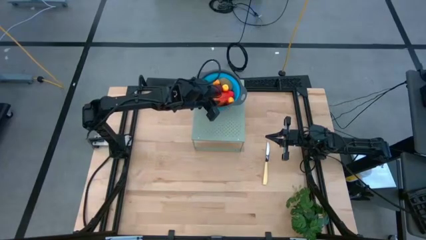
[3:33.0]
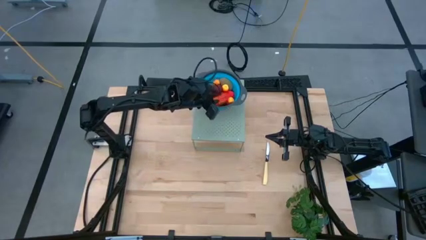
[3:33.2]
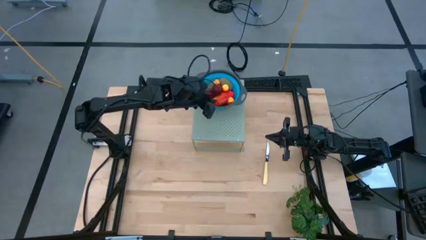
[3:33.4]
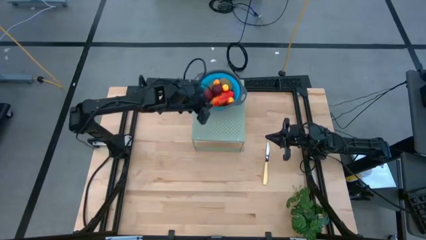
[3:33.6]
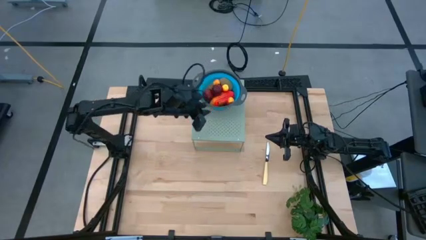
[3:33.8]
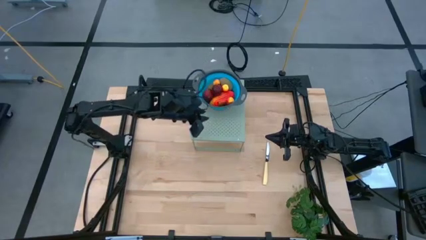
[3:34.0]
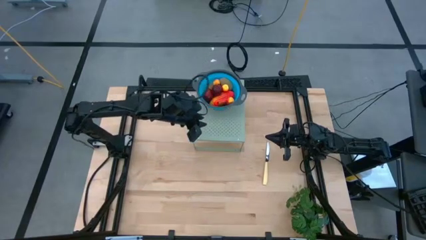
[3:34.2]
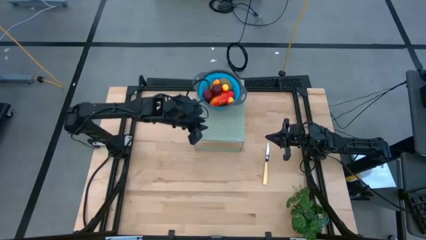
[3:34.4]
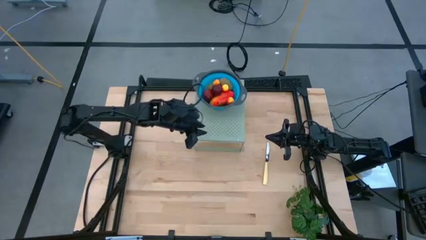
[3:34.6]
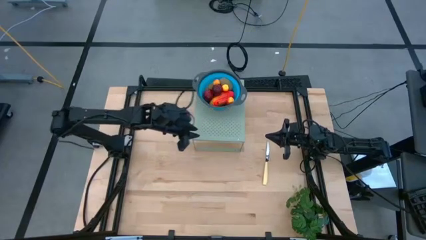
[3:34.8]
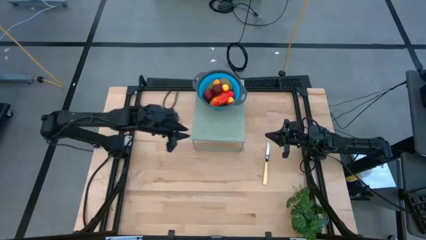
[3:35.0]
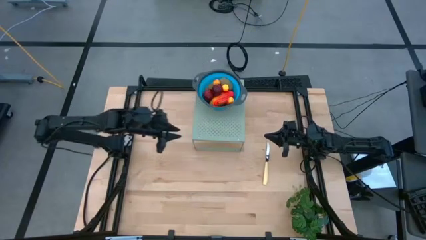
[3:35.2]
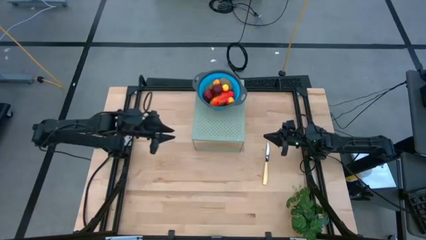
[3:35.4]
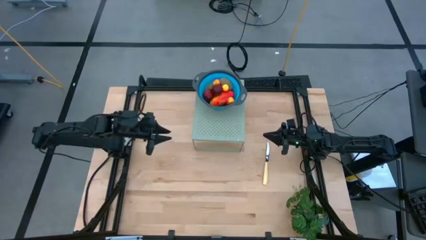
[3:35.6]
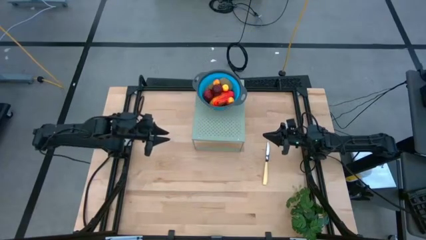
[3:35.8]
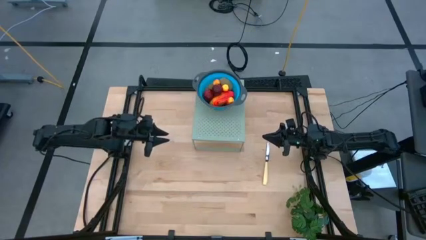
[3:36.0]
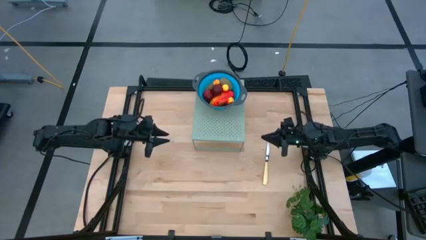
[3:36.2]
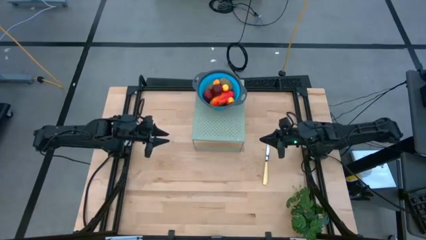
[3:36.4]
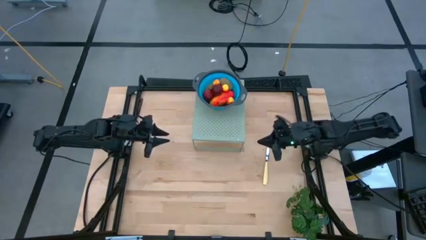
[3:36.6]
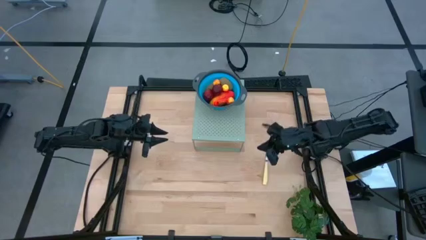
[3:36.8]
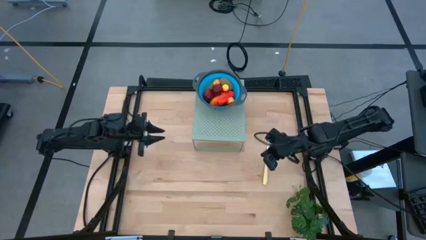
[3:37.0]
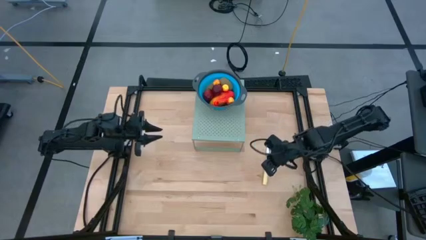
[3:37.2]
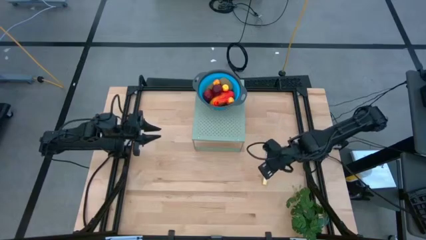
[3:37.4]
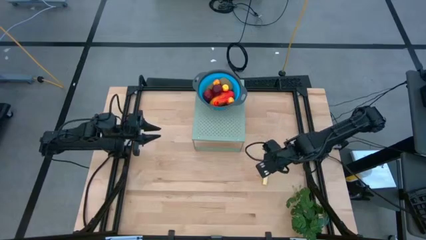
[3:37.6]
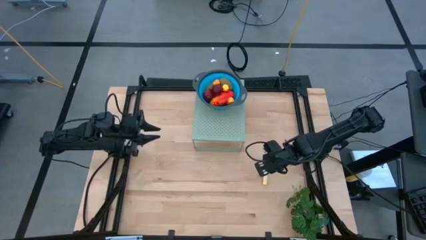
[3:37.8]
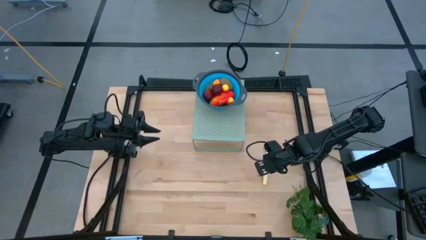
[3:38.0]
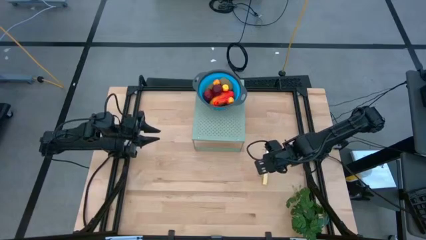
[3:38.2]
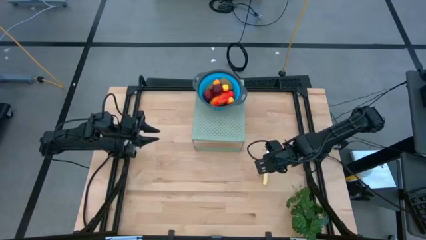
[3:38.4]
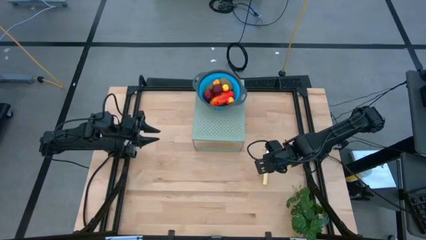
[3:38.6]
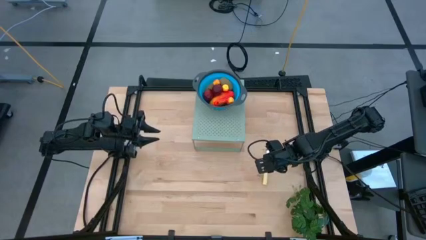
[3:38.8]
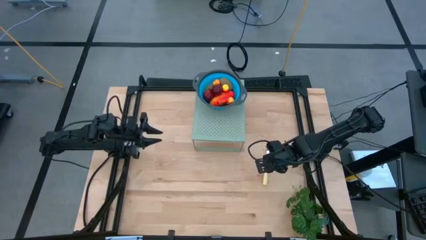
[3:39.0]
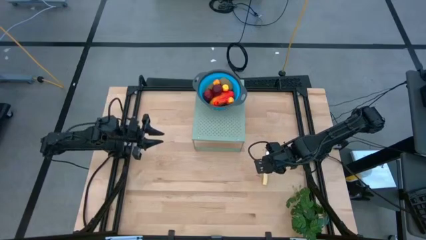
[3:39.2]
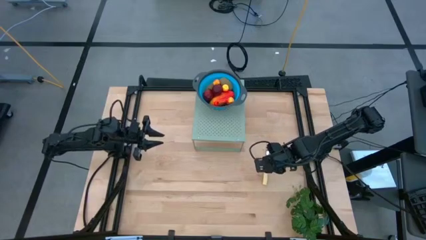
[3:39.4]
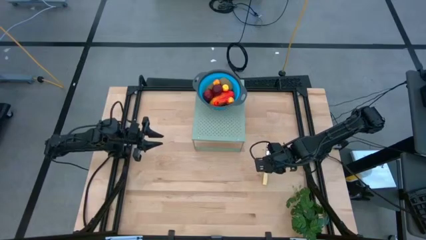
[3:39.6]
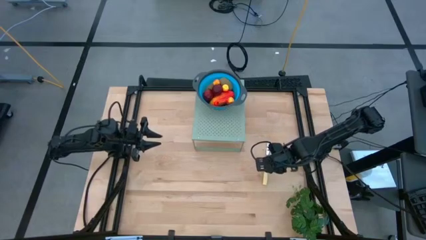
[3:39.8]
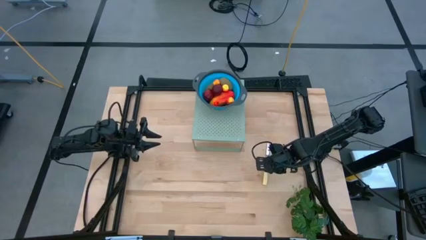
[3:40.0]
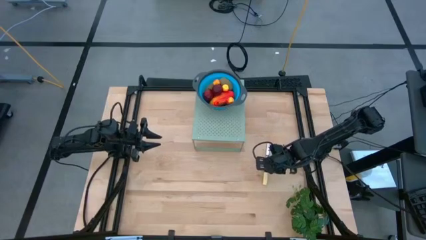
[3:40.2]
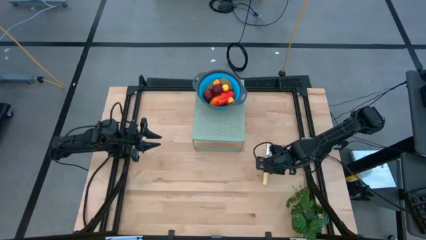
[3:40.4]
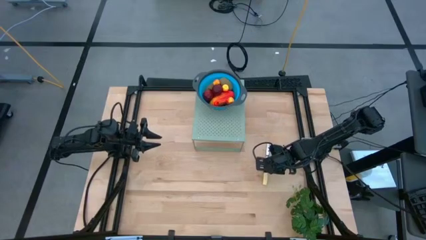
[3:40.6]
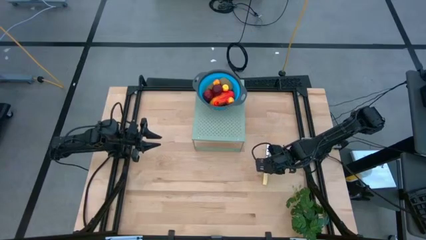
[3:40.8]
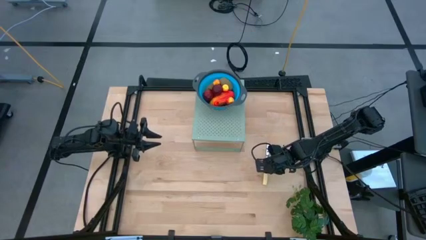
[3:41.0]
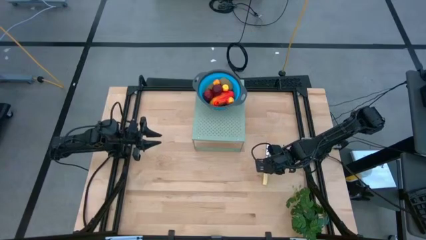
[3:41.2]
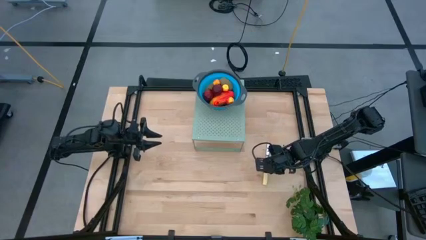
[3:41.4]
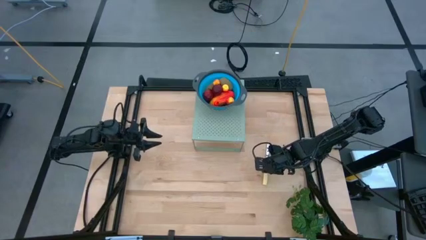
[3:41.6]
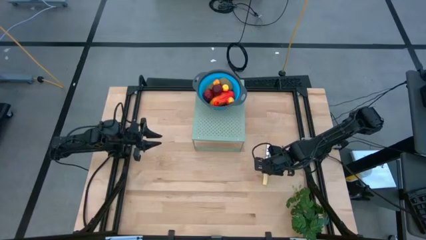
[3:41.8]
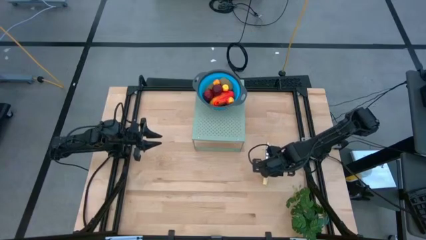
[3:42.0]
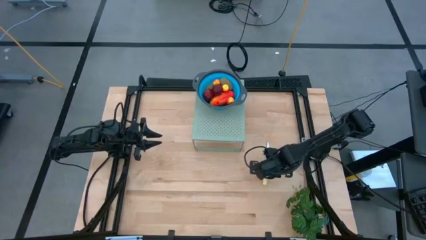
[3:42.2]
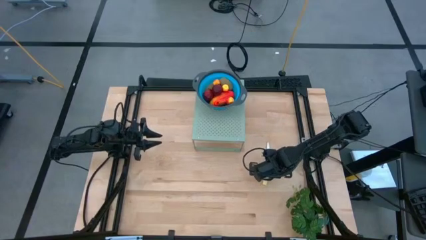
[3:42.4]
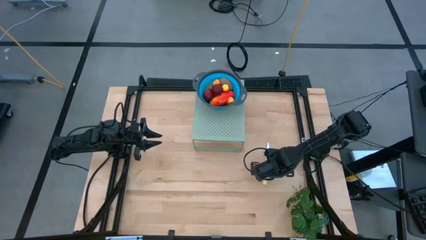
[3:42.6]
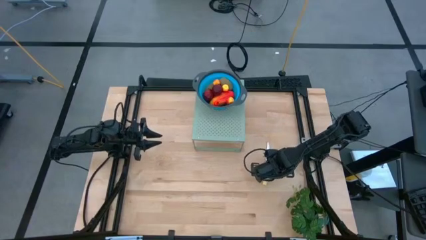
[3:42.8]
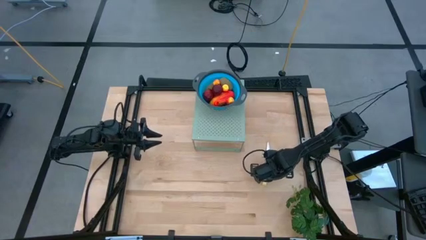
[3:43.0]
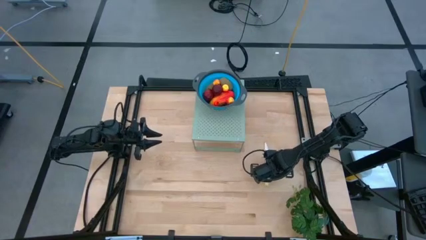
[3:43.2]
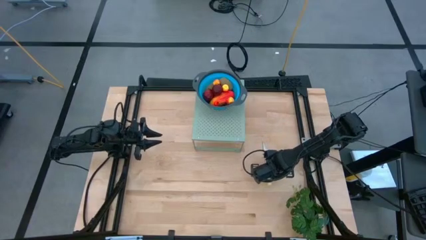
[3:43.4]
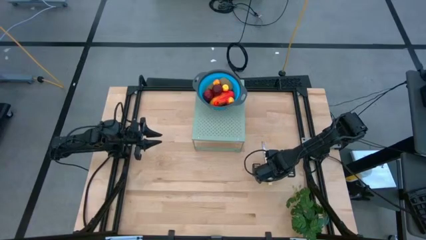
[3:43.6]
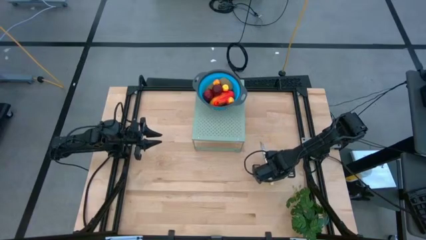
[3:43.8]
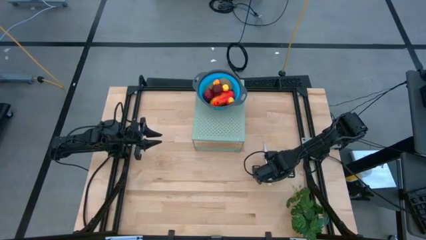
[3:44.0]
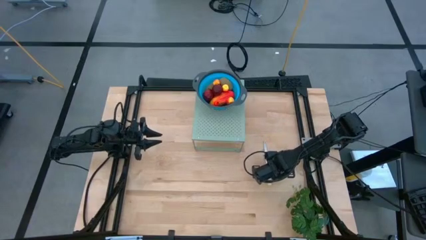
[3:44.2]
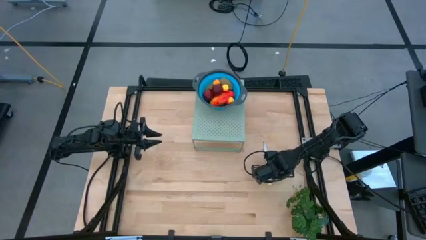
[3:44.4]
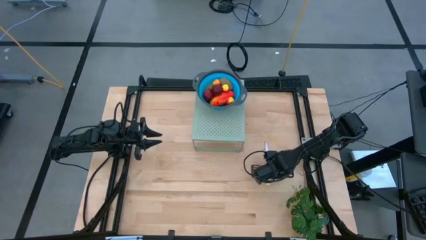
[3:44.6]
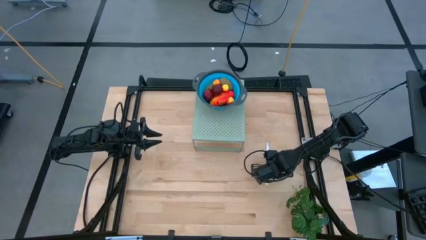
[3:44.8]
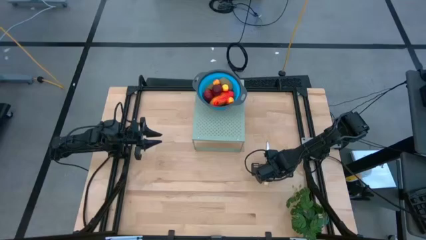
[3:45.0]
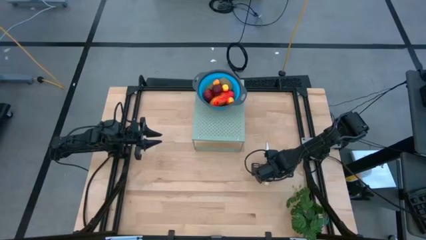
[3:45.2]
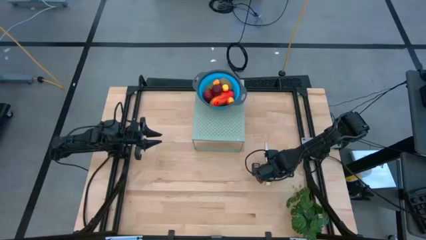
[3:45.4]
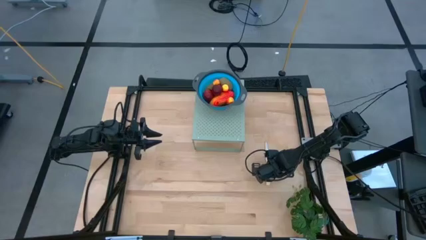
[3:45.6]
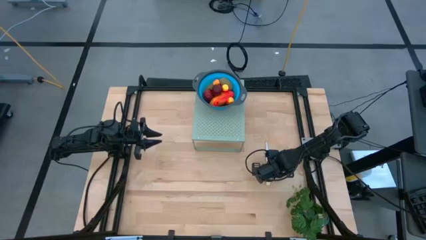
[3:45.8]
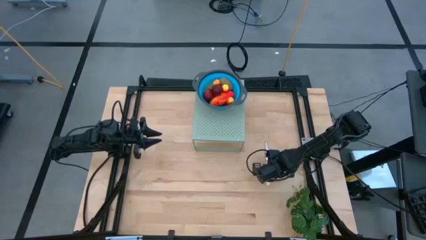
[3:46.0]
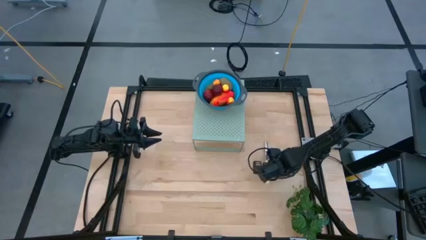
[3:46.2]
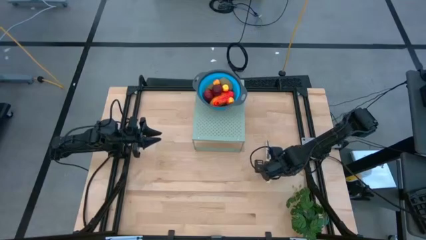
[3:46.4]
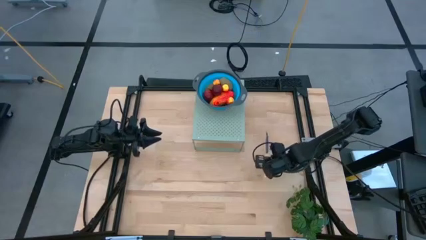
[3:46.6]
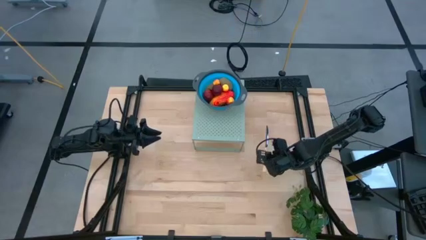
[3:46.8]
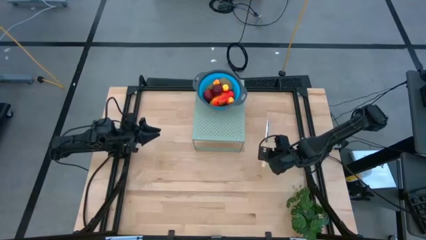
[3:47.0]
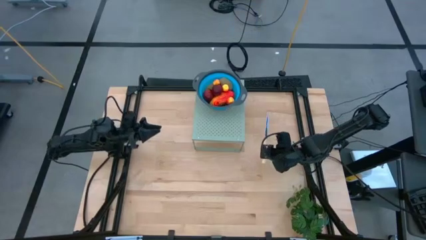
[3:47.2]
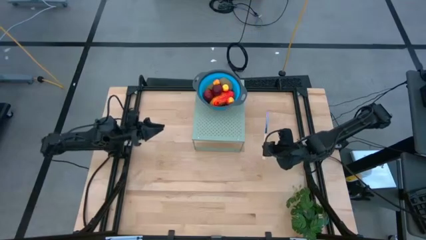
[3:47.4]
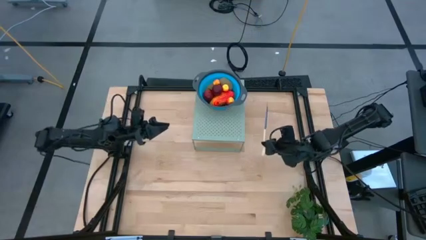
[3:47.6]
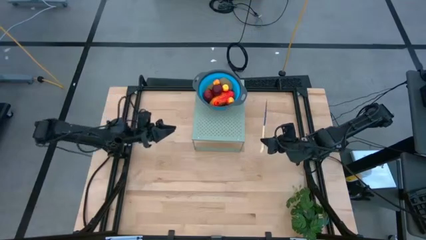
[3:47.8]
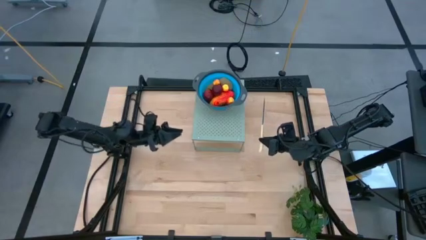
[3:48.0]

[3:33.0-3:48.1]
Task: Pick & Place Fruit
Put the yellow knife on the shelf
